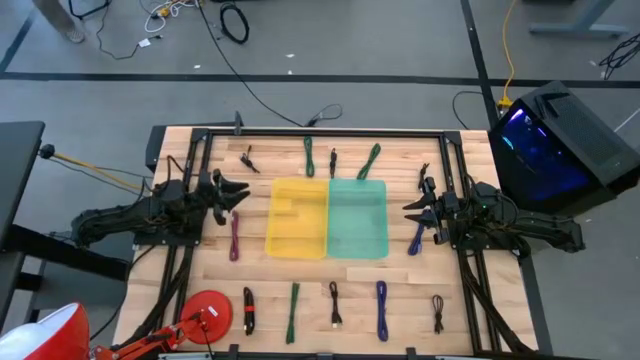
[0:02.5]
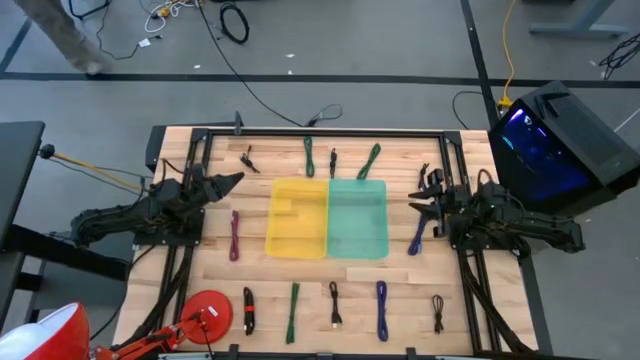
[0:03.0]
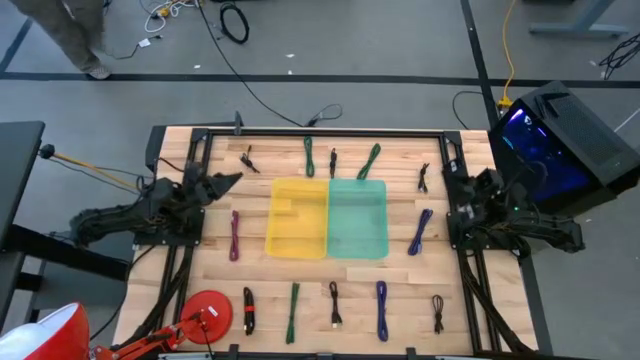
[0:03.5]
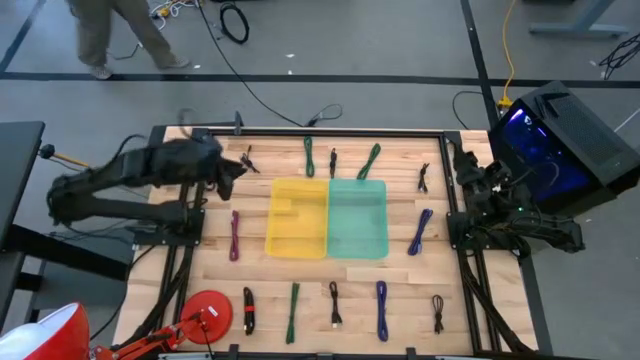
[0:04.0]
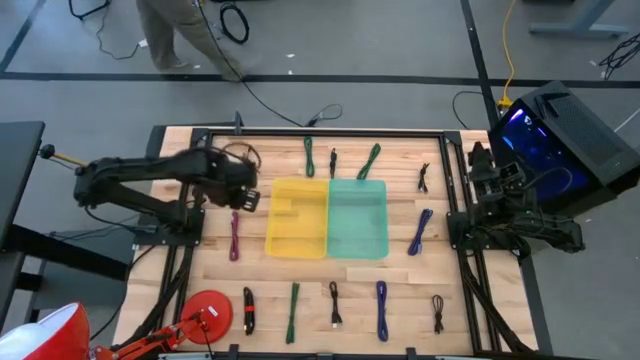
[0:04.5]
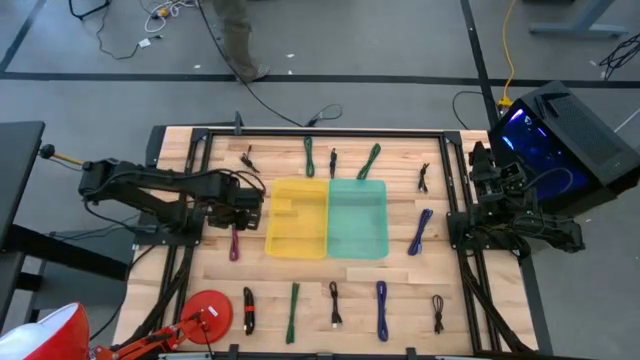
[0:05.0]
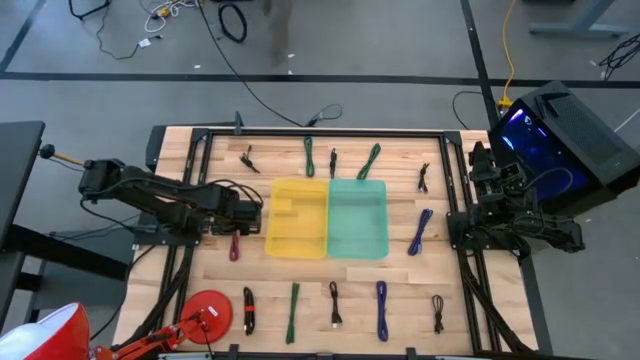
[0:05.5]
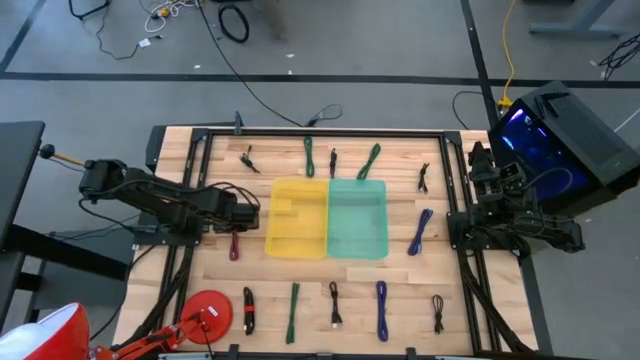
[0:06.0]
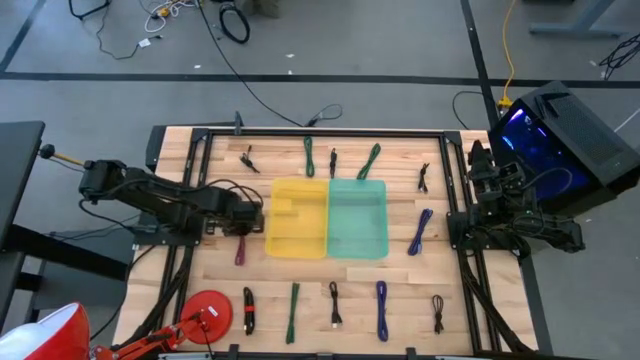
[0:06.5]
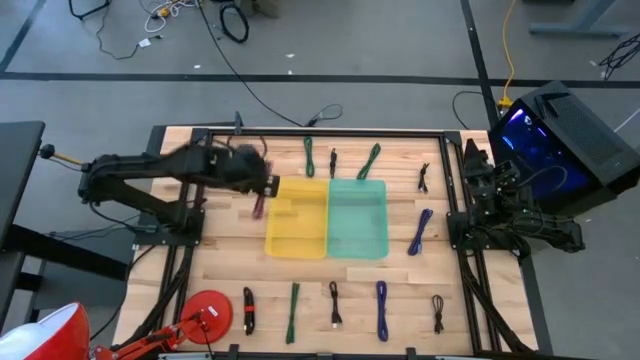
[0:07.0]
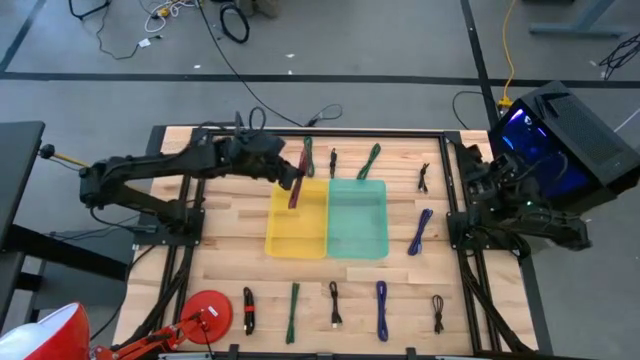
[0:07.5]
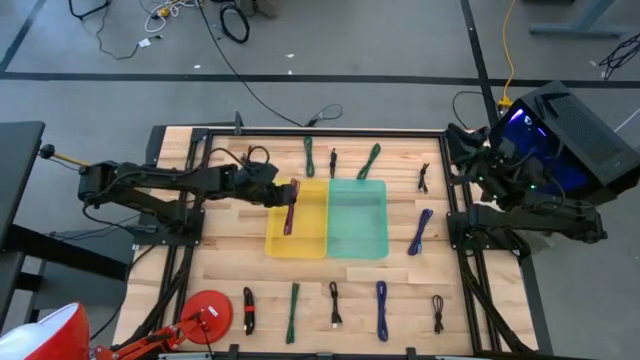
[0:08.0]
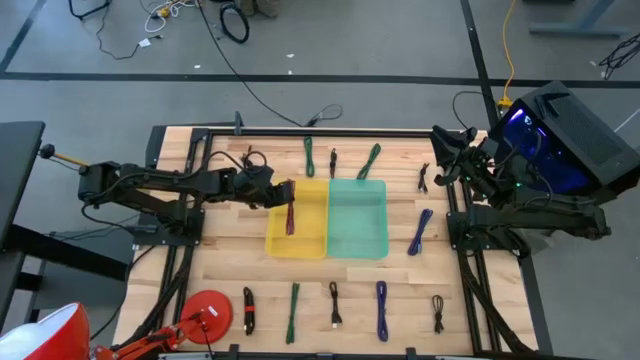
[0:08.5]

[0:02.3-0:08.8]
Task: Pick & Place USB Port
Put the red patterned charger cable into the yellow bin

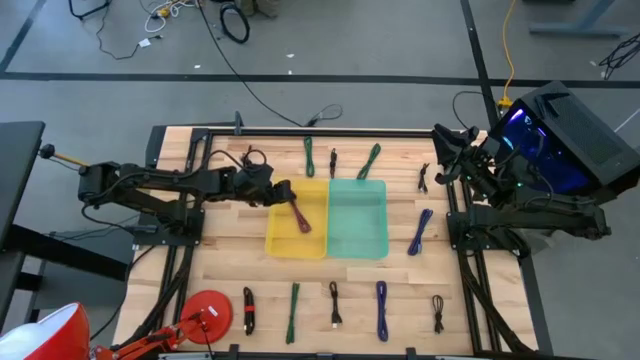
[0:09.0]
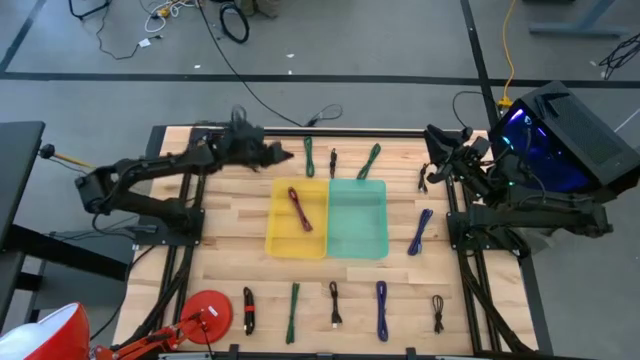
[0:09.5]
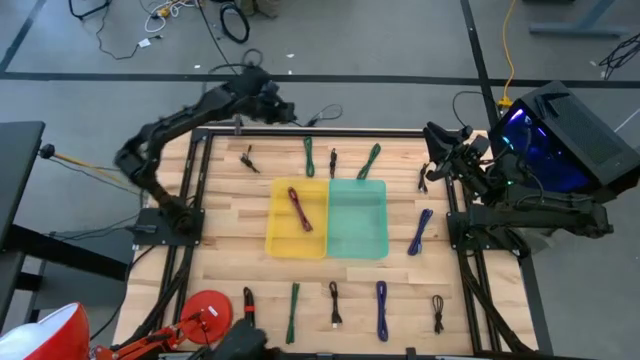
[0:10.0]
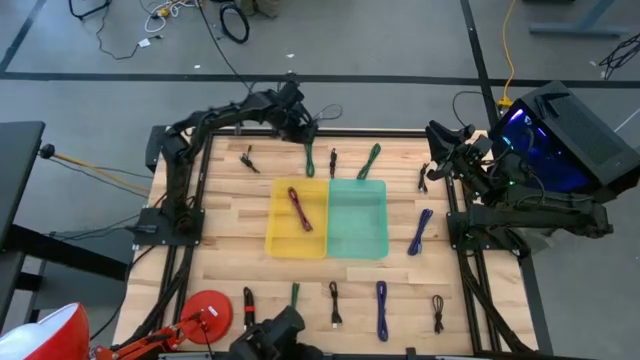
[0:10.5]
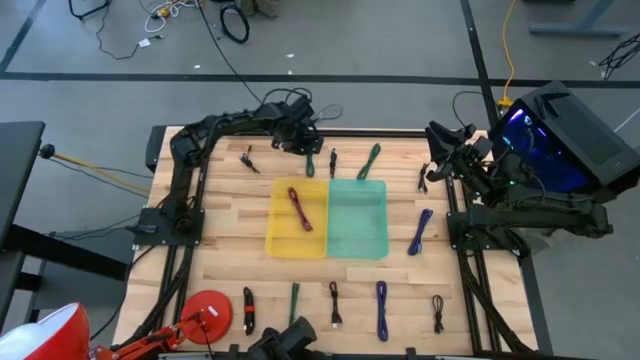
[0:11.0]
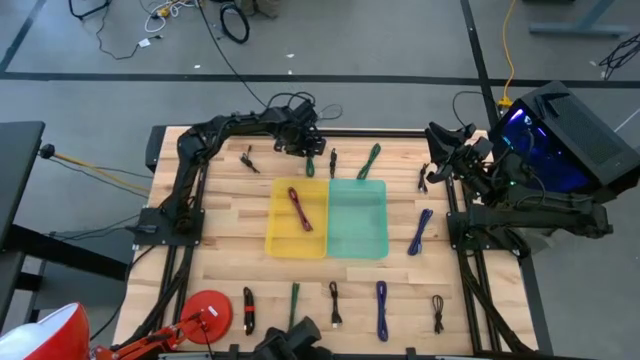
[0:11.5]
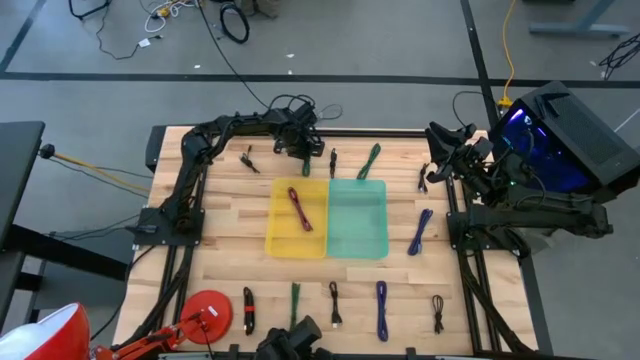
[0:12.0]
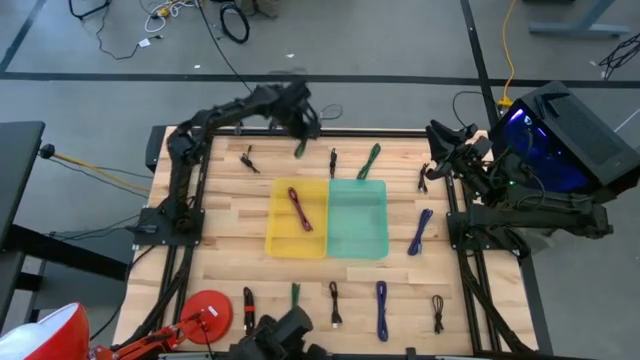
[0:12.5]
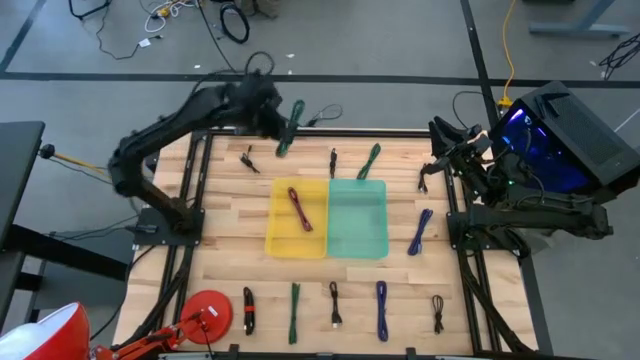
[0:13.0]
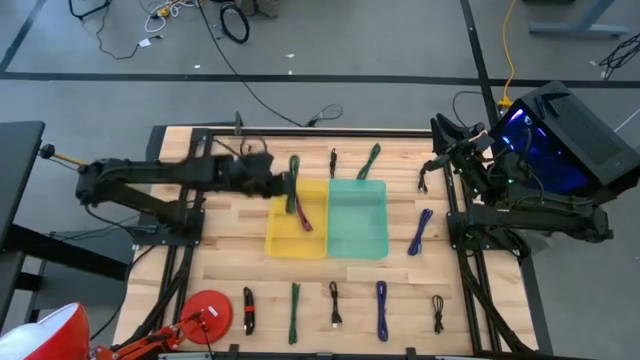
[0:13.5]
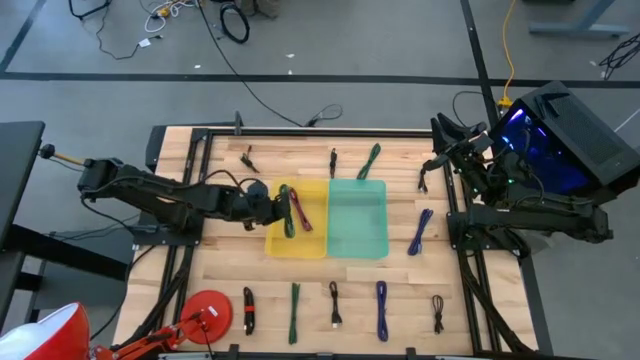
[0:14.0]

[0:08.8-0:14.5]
Put the green patterned charger cable into the yellow bin

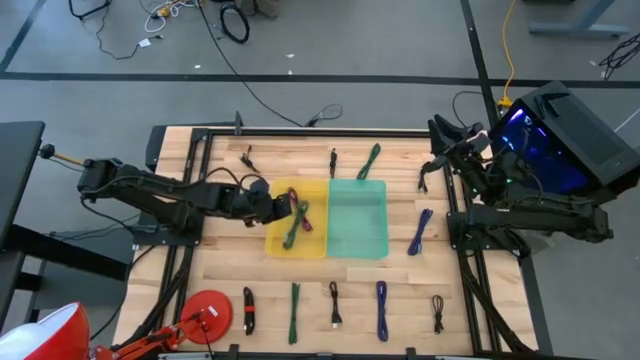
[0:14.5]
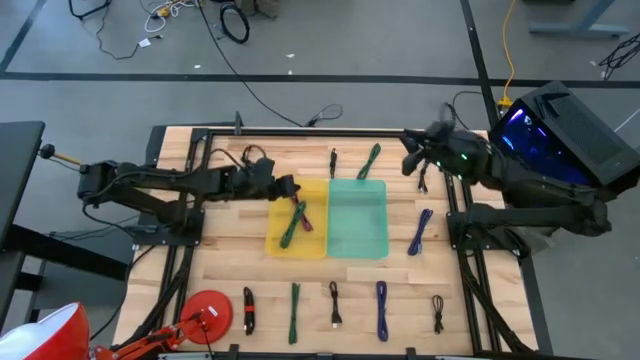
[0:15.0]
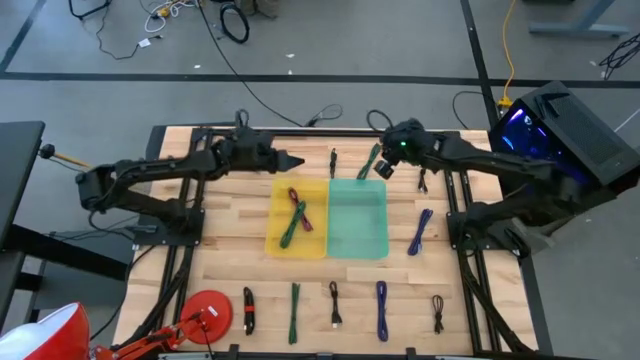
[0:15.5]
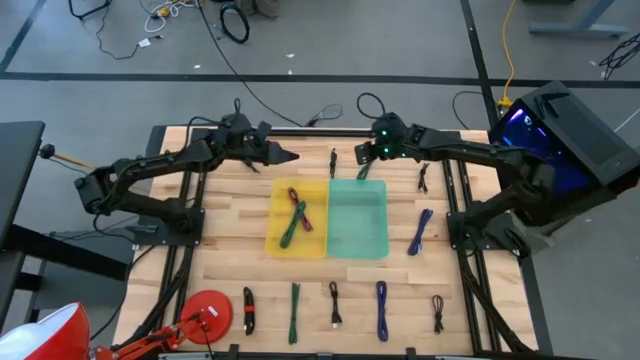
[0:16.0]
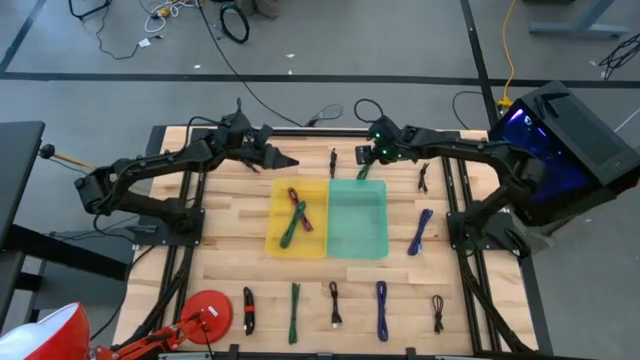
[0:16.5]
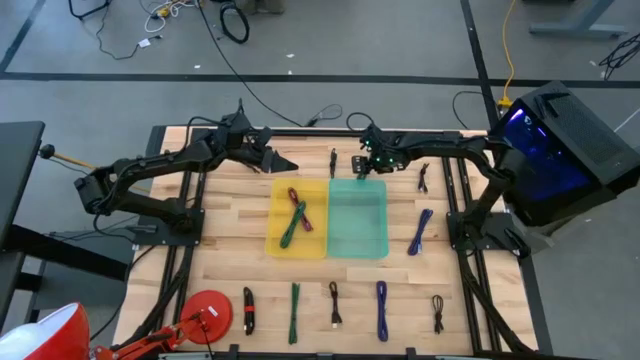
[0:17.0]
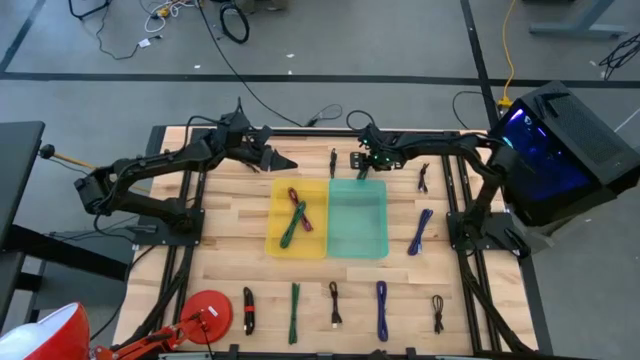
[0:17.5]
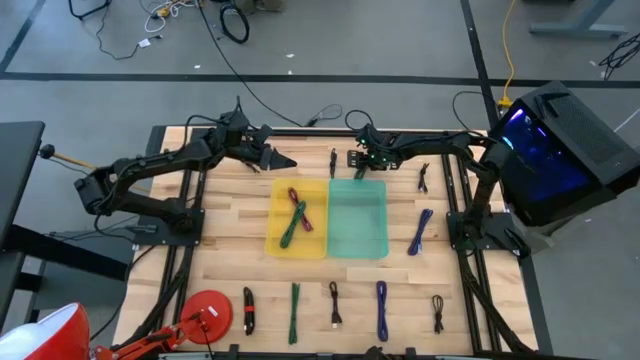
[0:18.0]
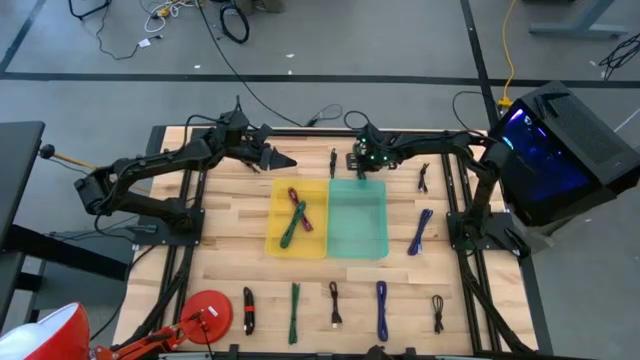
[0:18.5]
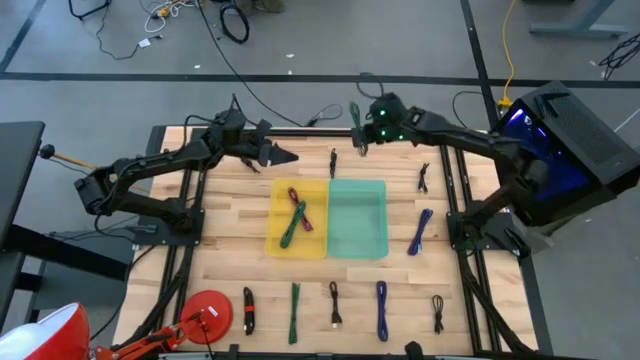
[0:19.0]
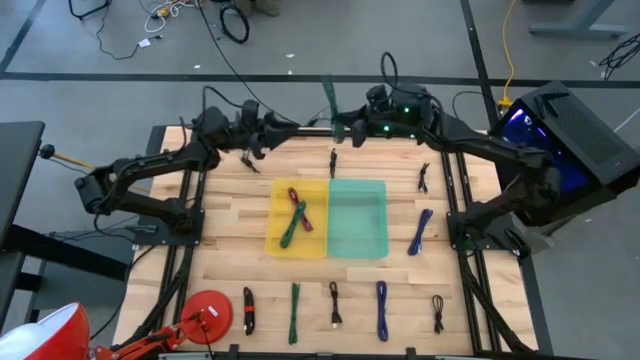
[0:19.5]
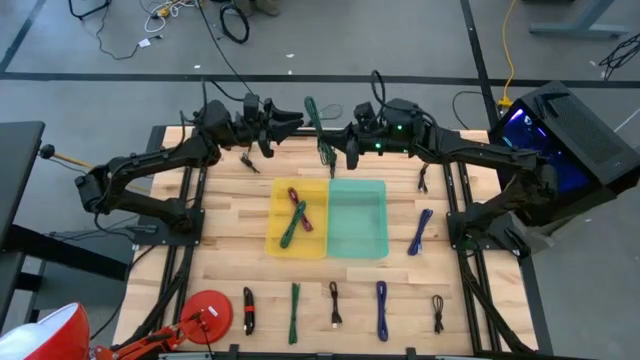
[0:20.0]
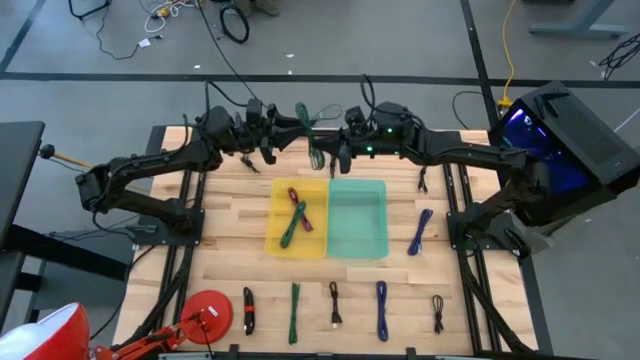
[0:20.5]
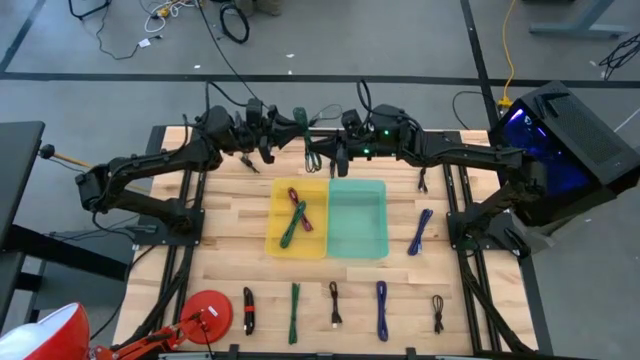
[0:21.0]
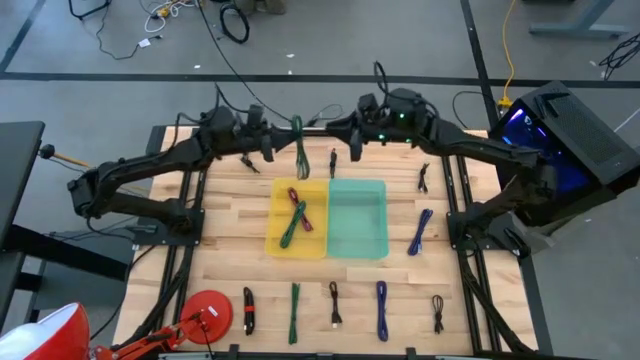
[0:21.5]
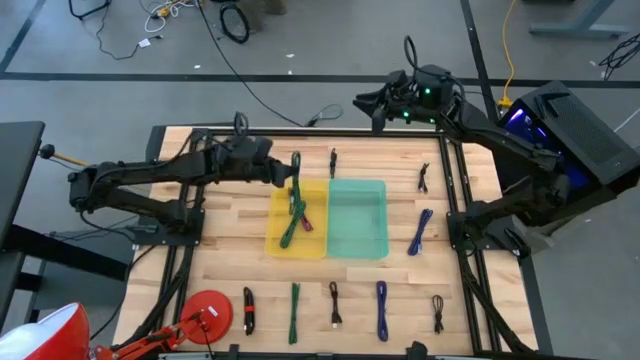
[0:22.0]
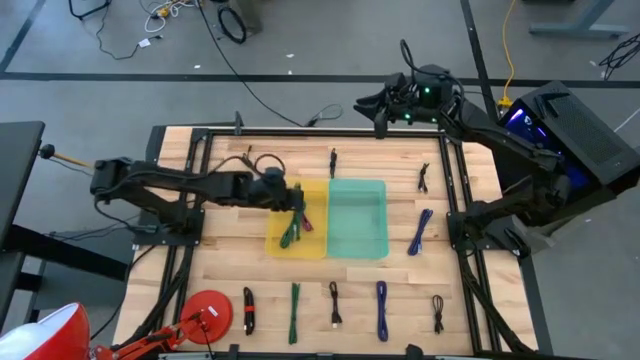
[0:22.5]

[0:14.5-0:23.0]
Put the green patterned charger cable into the yellow bin

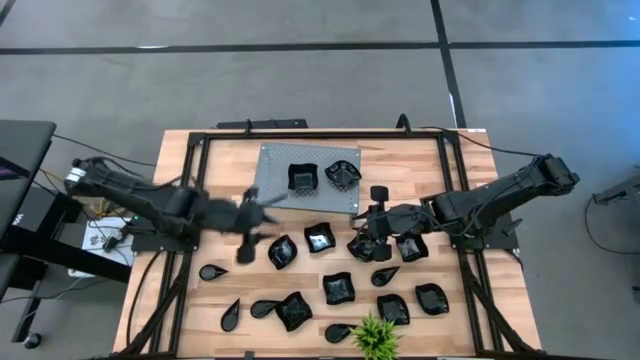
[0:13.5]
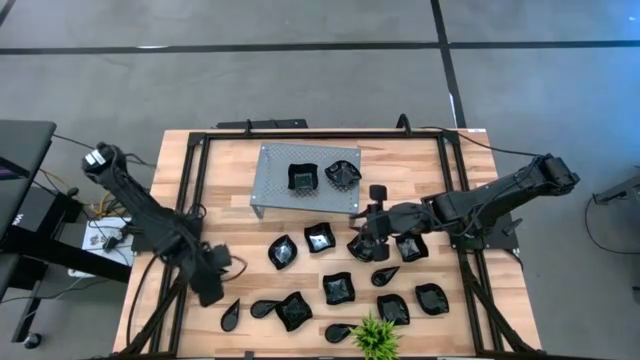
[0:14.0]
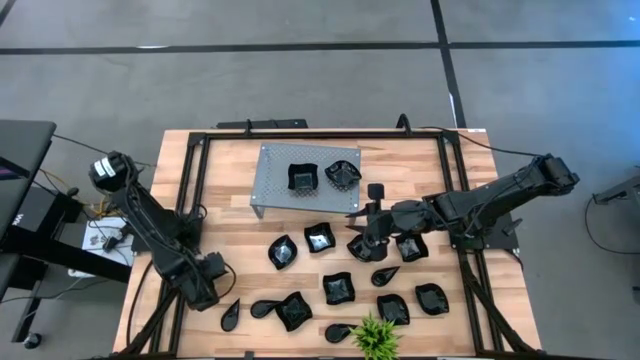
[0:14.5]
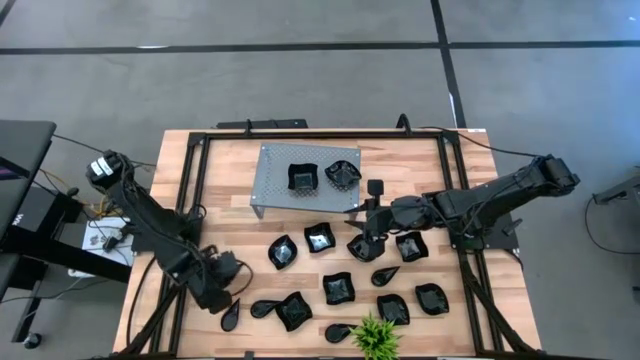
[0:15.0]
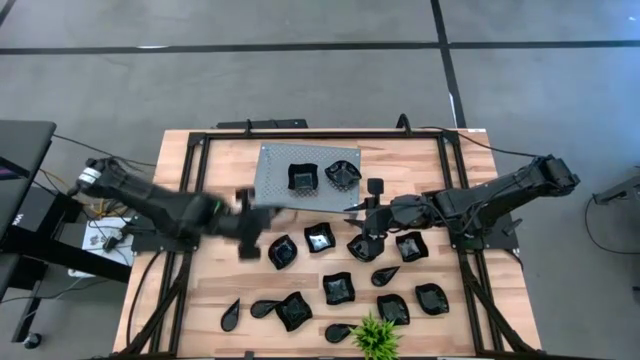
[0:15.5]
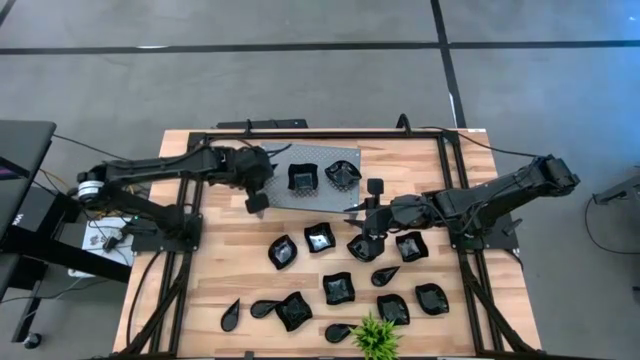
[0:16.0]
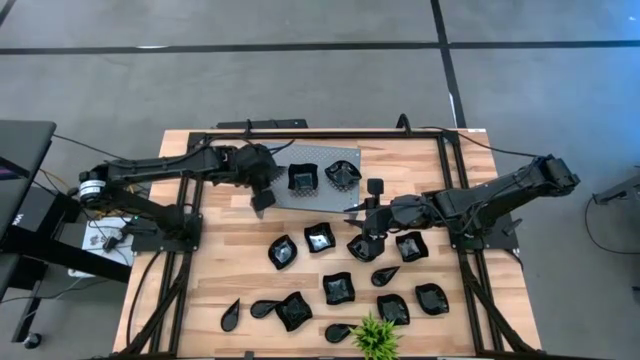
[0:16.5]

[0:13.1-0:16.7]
Task: Pick & Place Mini shaped plates
Put the black drop-shaped plate on the shelf
